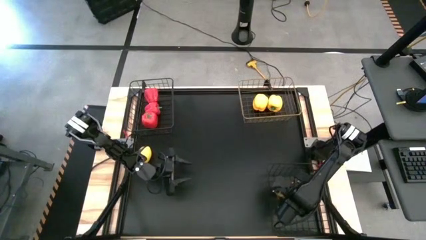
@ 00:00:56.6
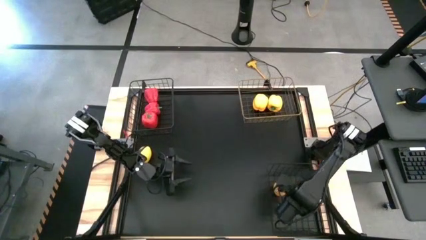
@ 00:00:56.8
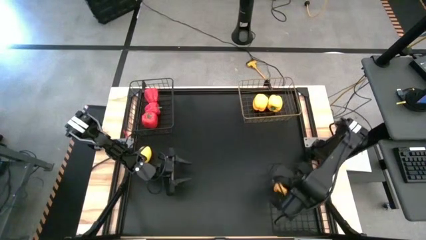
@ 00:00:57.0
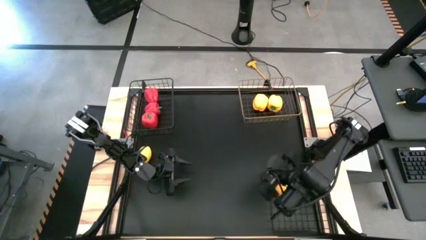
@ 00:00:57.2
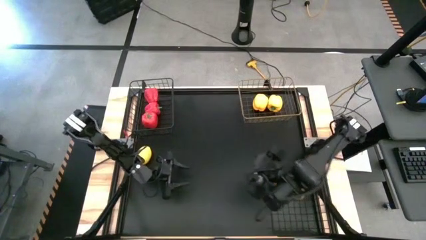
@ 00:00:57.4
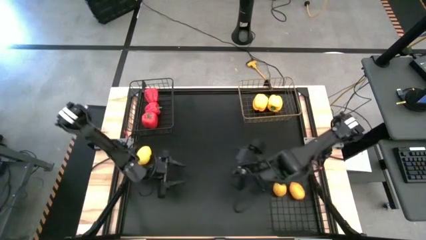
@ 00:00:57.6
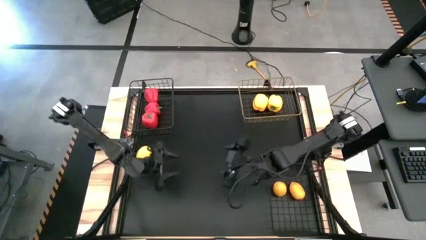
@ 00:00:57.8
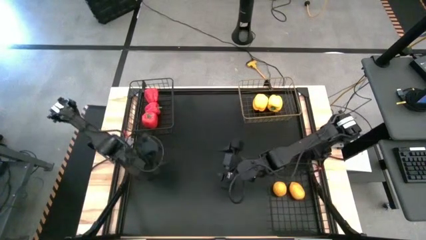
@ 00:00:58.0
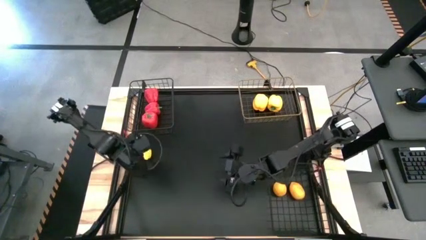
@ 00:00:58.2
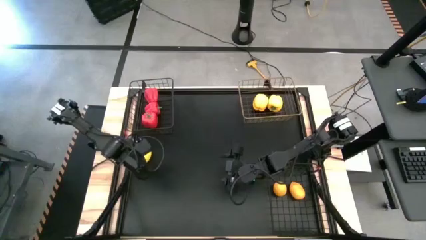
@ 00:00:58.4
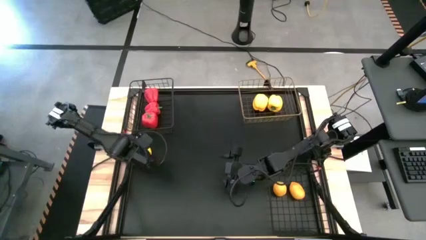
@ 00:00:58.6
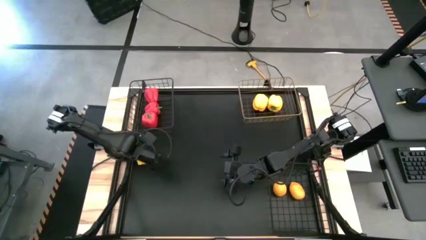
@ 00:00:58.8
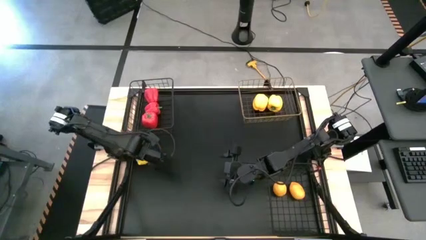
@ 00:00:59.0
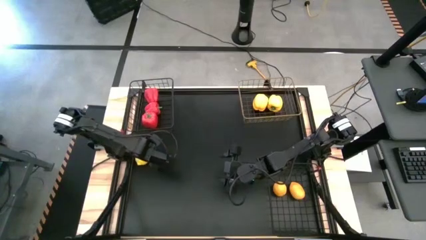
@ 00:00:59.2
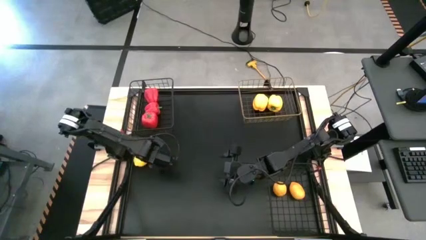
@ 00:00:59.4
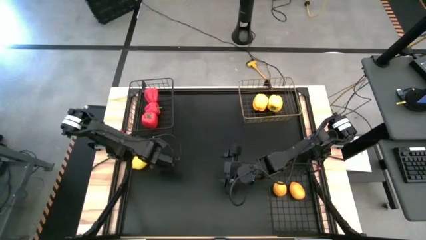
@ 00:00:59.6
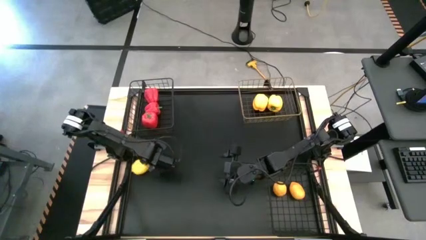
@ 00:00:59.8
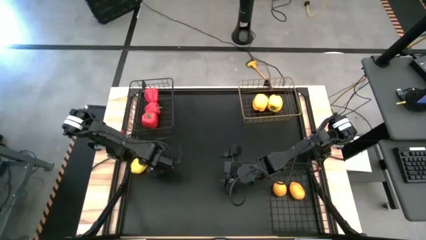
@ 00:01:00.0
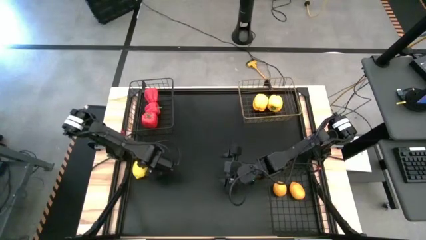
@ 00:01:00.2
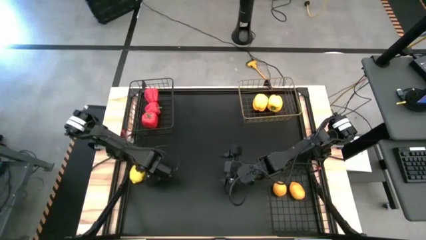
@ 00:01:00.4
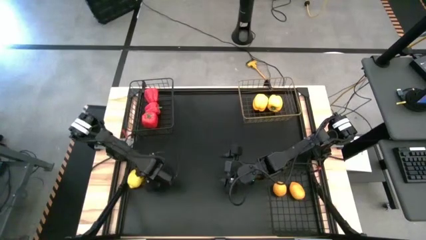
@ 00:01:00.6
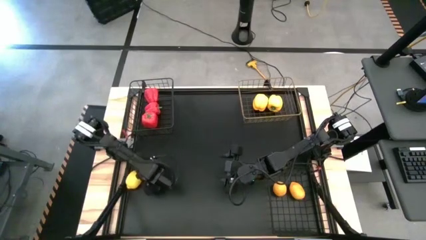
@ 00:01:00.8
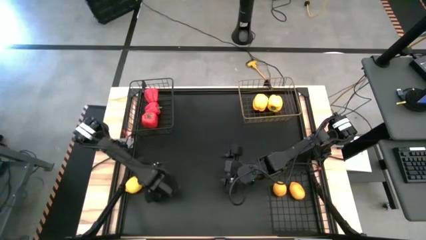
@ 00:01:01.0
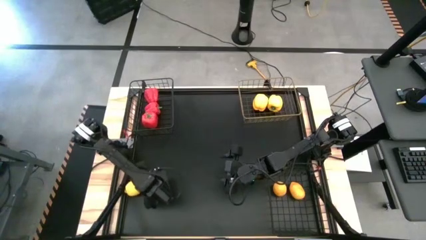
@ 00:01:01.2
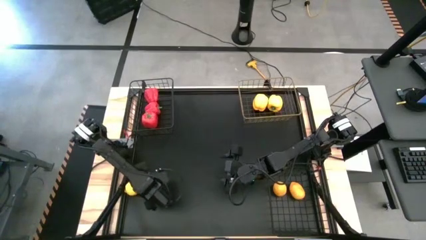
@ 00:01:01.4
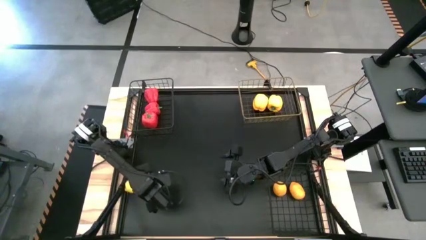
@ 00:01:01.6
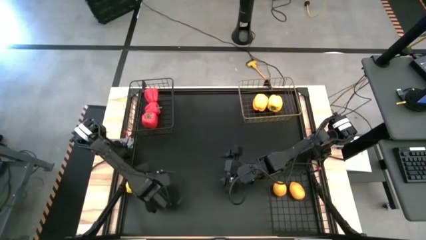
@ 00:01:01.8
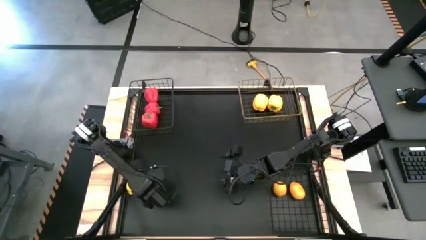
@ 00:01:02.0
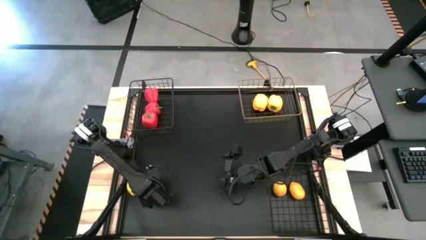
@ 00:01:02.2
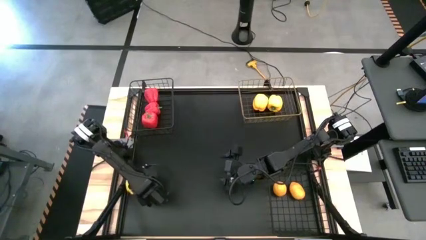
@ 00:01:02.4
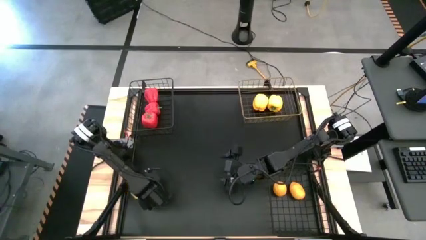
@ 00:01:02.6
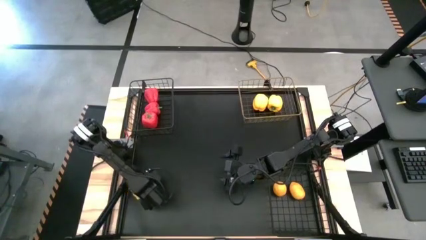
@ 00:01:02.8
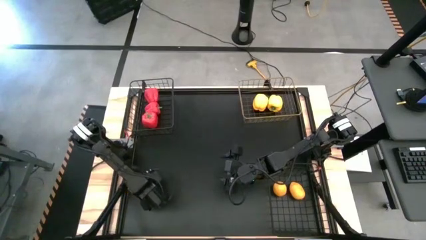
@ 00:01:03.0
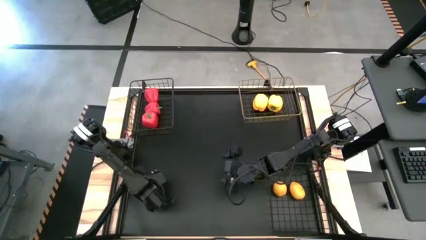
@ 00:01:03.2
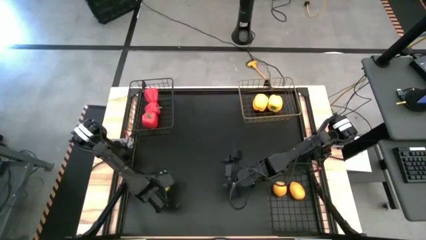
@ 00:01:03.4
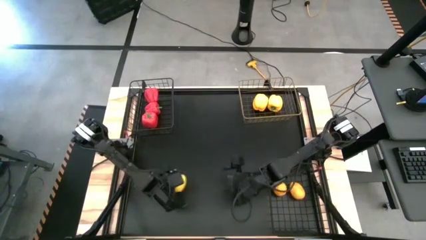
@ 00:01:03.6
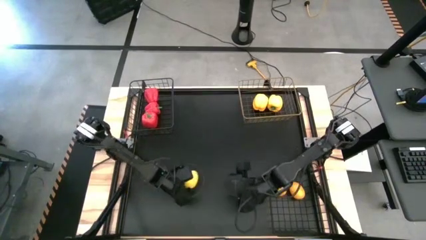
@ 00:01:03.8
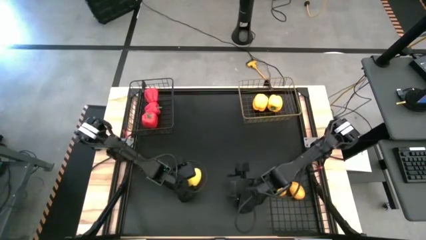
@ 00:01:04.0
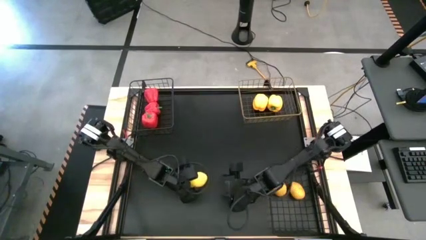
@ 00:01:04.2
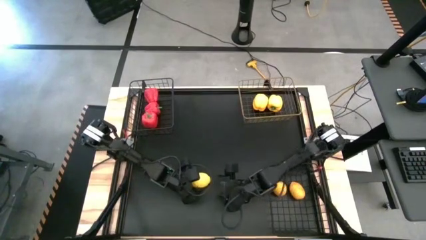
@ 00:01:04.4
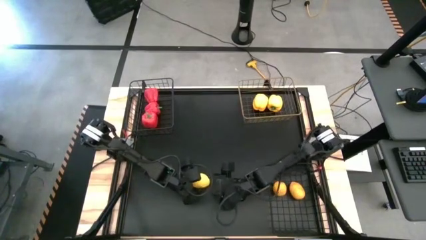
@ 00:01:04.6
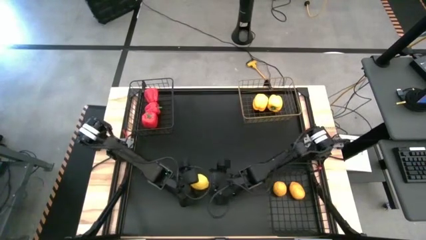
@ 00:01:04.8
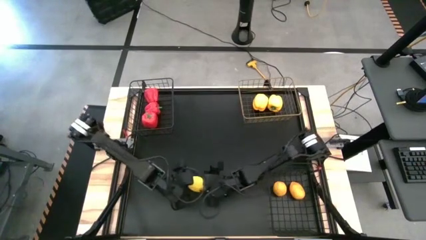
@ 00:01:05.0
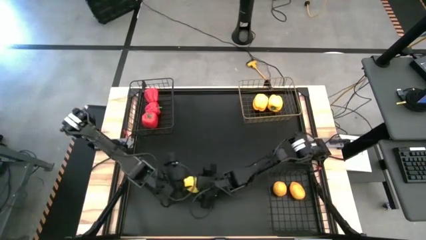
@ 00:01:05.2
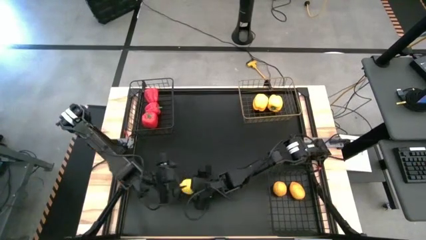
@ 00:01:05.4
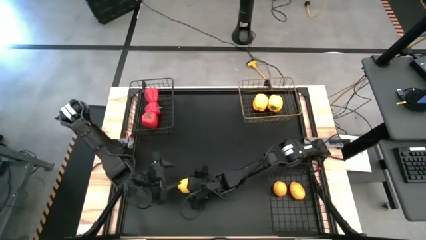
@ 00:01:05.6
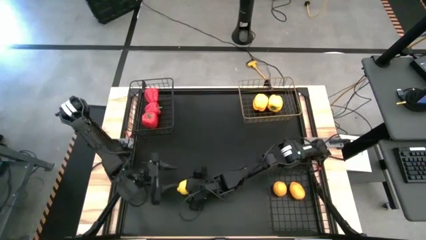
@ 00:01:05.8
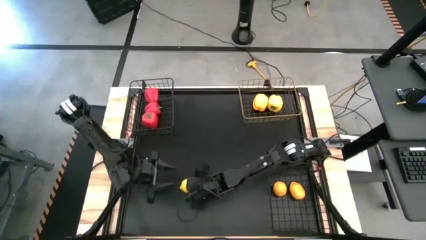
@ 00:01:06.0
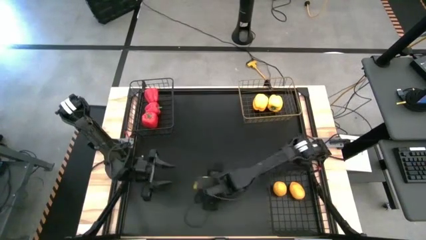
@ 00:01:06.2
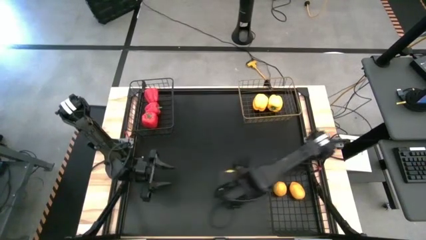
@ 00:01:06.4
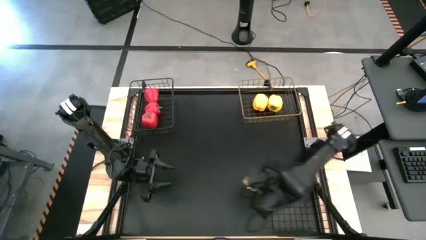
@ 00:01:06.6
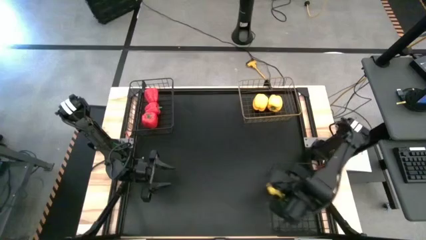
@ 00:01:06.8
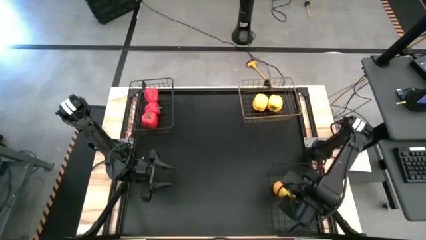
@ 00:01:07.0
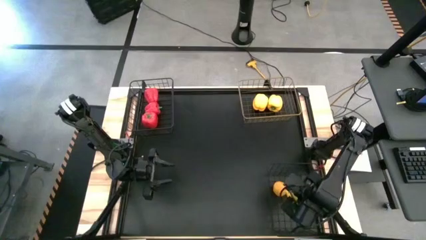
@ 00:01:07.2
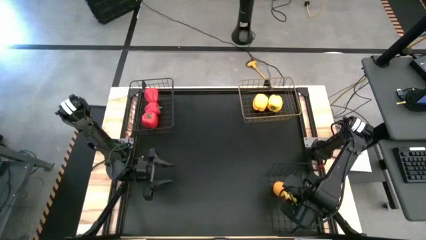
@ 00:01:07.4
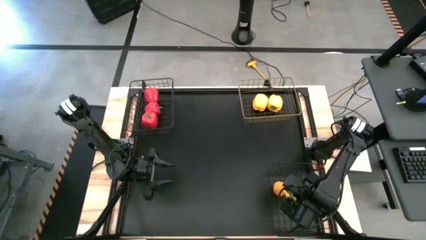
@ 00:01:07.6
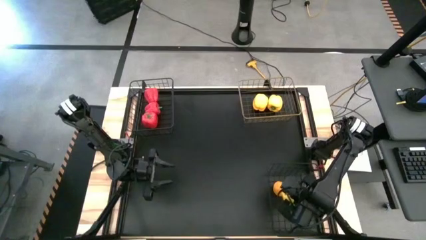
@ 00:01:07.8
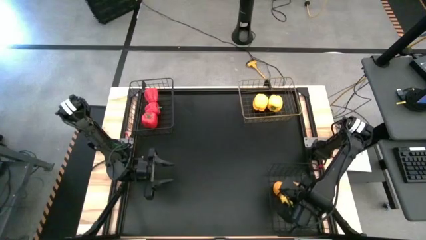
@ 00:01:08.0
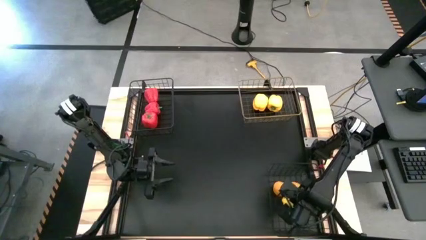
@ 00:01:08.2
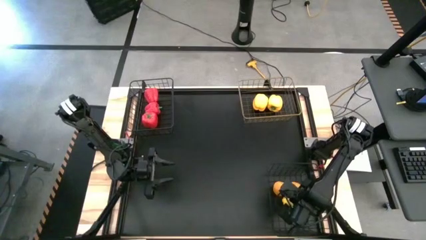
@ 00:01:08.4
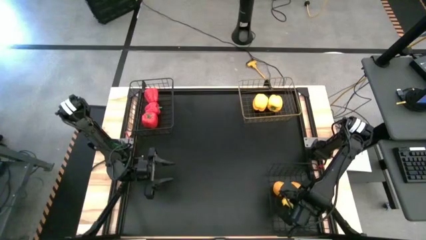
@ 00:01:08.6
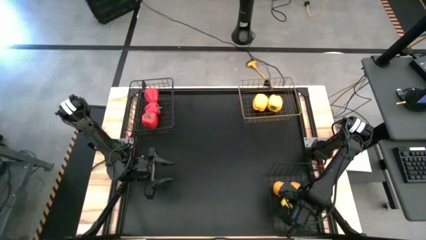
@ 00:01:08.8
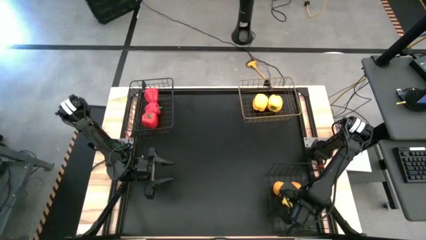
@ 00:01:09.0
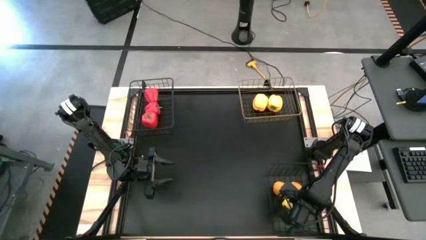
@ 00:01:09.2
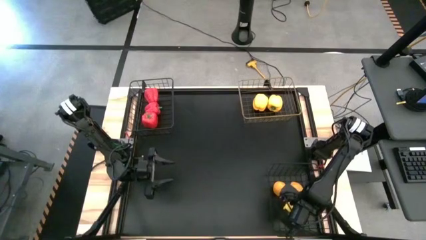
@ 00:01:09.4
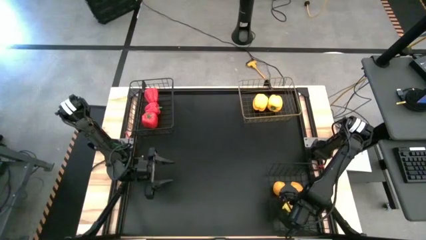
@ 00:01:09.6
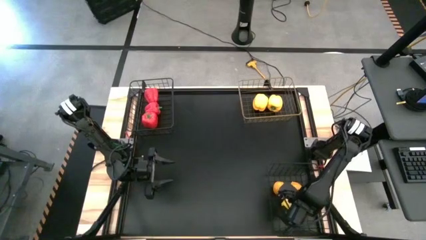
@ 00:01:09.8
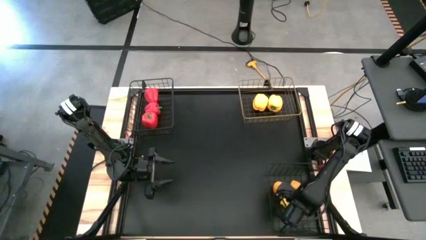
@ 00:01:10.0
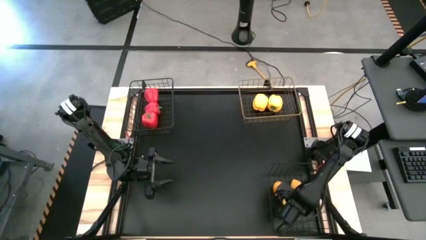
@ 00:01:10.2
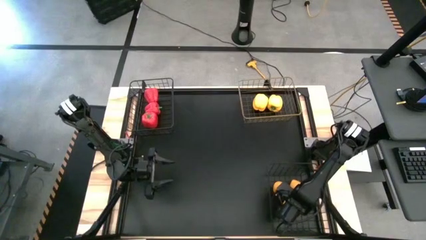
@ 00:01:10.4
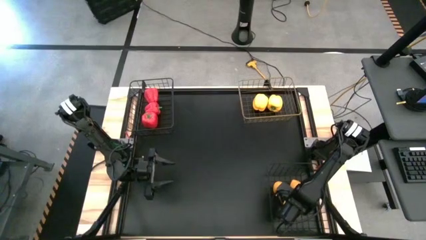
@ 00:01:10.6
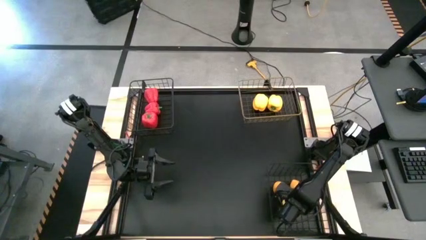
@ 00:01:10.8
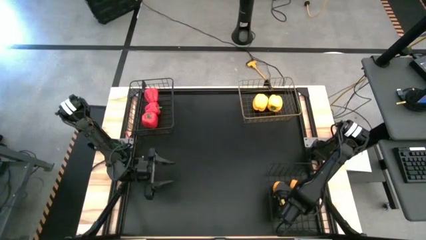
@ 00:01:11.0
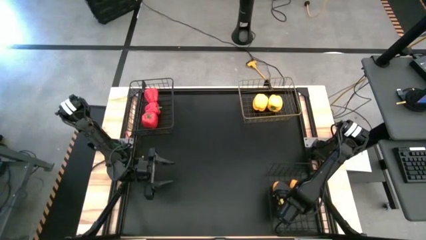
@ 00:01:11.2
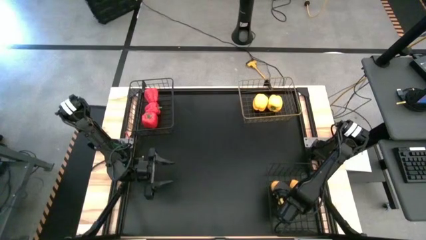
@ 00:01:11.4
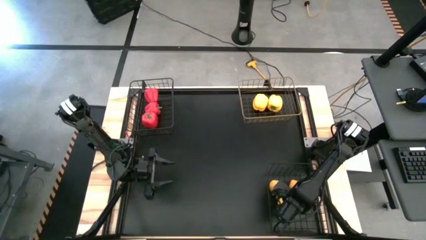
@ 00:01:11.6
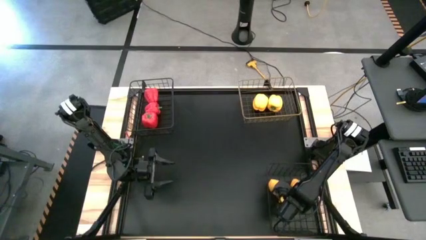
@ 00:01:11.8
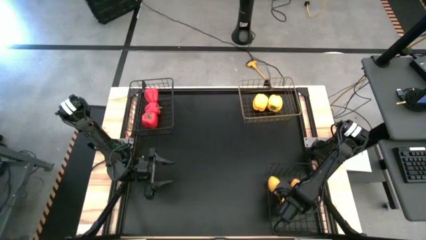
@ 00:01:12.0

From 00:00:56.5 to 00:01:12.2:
Task: Sort produce into baskets
Put the yellow lemon into the bottom black mesh basket
